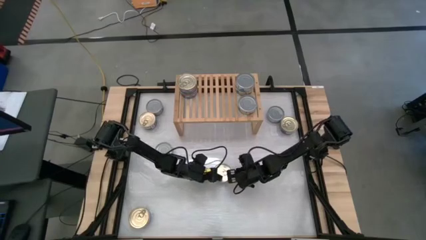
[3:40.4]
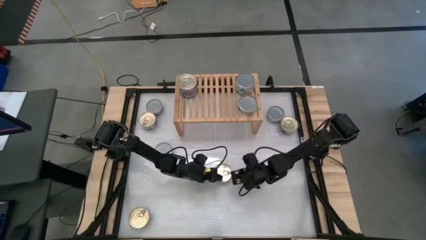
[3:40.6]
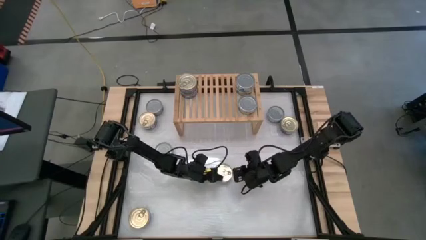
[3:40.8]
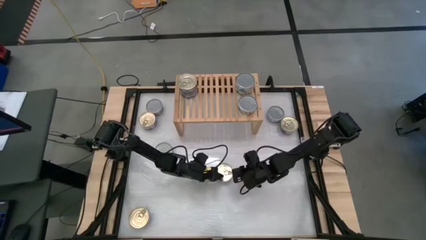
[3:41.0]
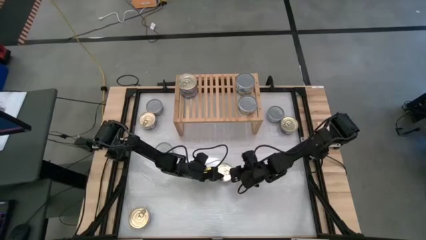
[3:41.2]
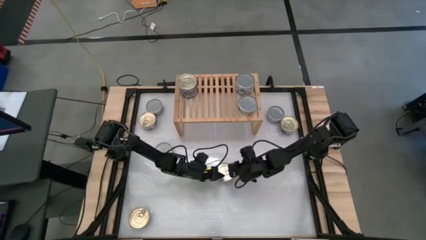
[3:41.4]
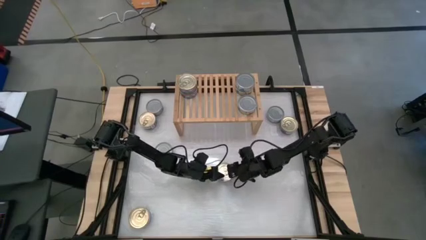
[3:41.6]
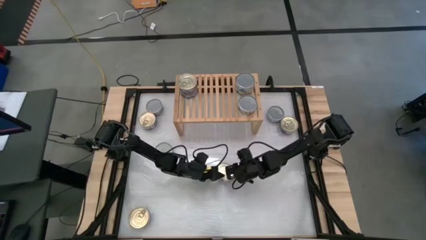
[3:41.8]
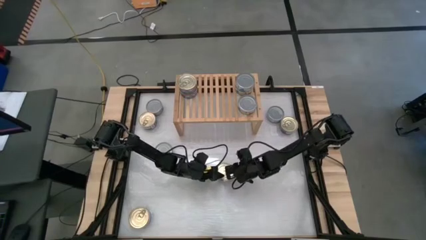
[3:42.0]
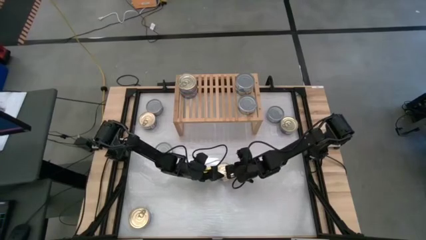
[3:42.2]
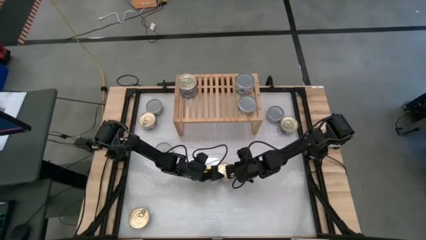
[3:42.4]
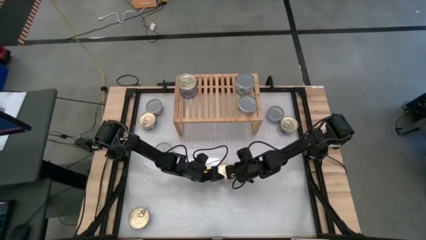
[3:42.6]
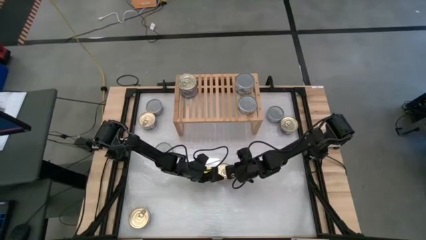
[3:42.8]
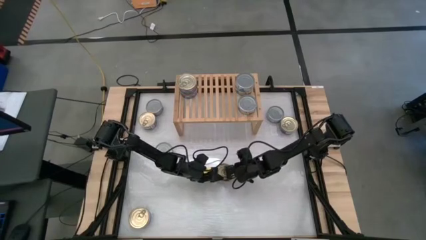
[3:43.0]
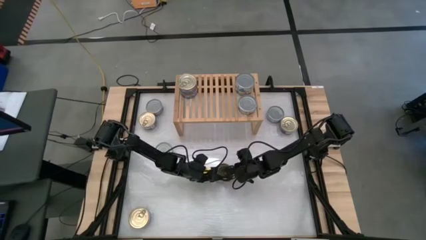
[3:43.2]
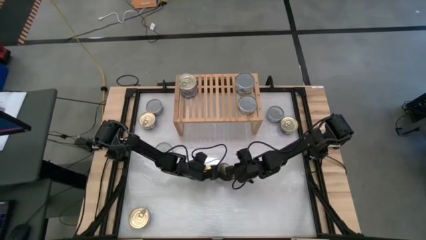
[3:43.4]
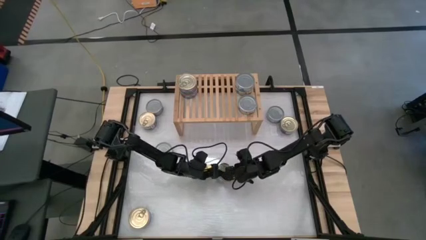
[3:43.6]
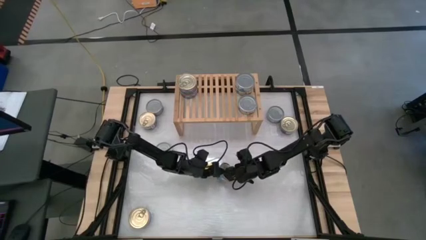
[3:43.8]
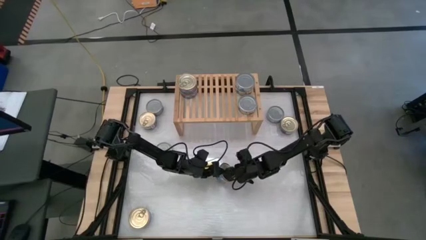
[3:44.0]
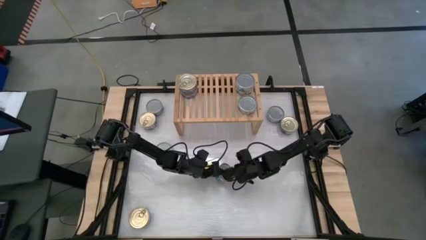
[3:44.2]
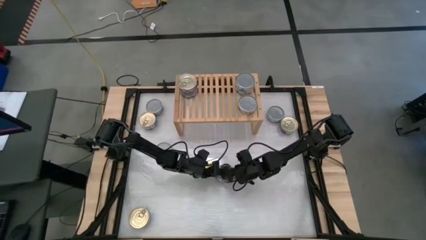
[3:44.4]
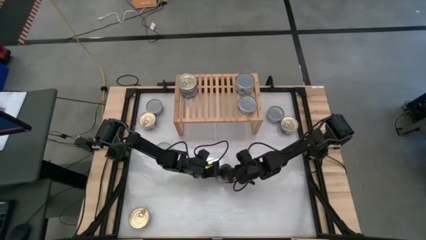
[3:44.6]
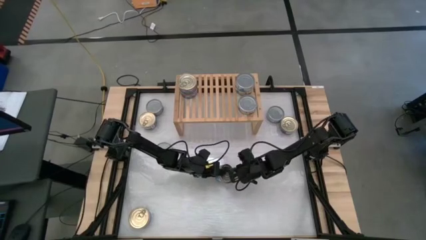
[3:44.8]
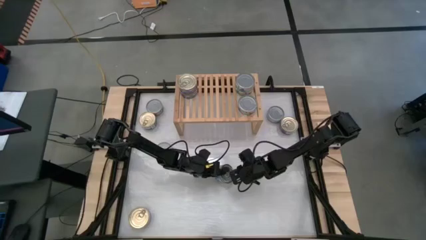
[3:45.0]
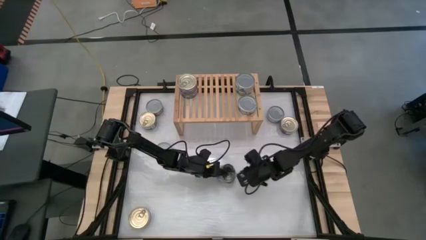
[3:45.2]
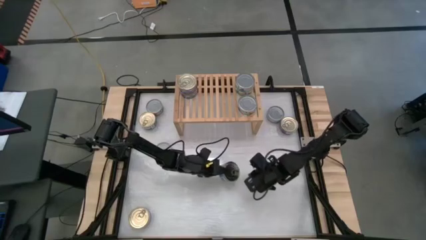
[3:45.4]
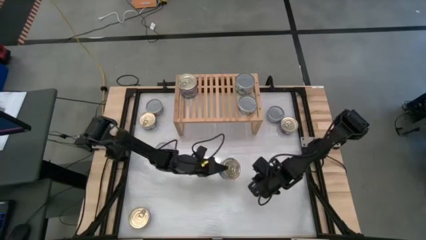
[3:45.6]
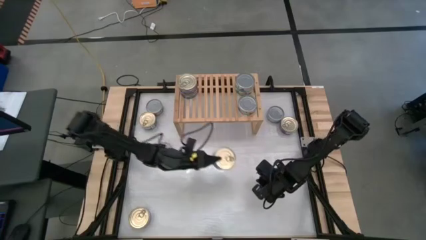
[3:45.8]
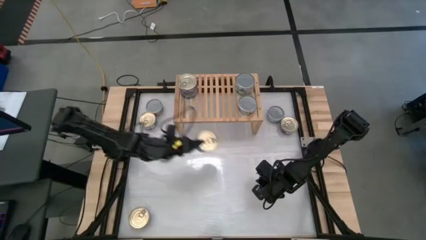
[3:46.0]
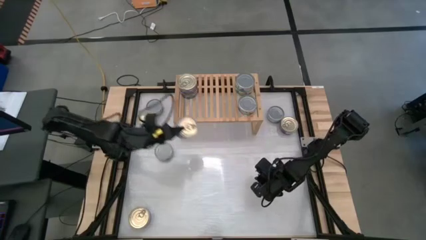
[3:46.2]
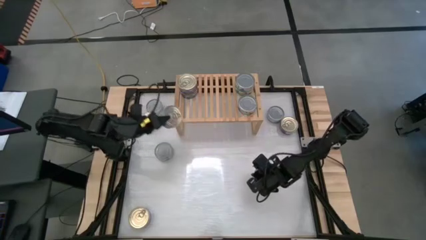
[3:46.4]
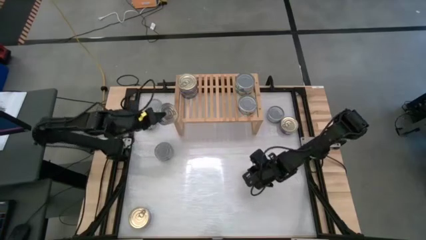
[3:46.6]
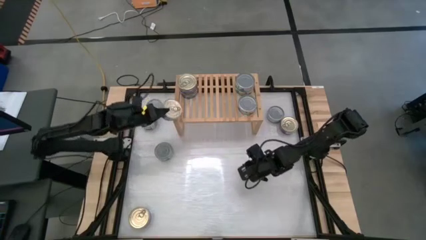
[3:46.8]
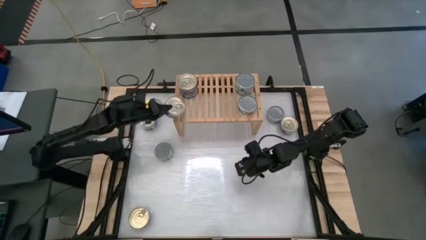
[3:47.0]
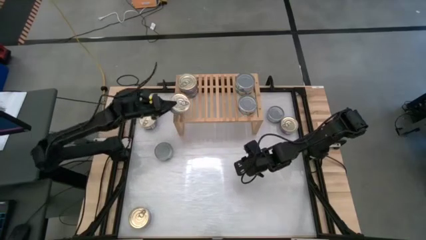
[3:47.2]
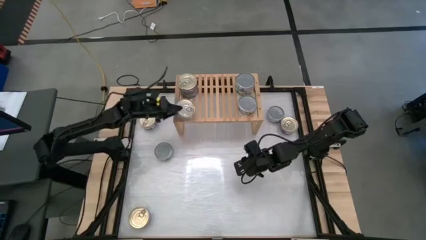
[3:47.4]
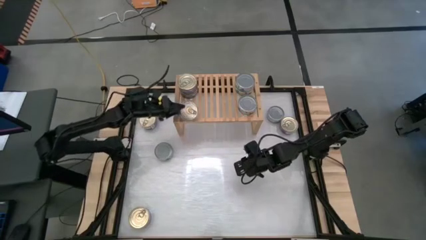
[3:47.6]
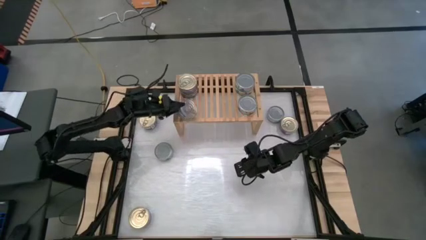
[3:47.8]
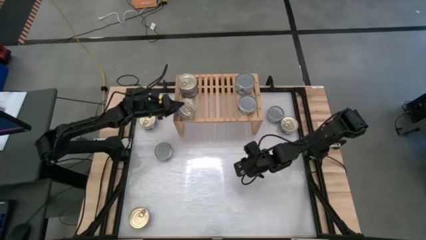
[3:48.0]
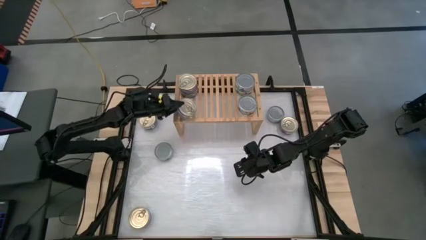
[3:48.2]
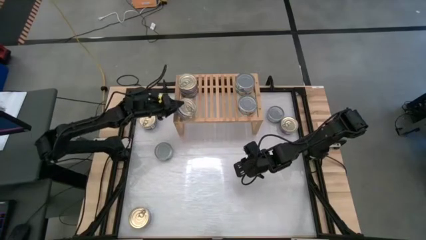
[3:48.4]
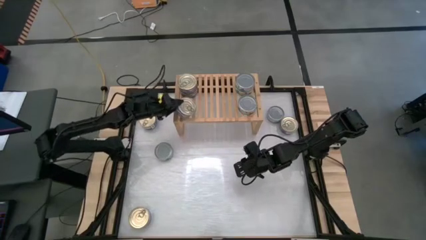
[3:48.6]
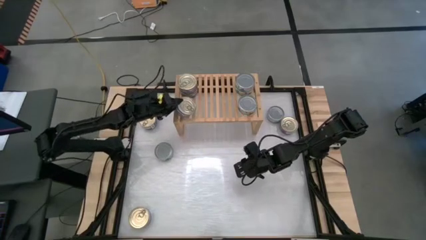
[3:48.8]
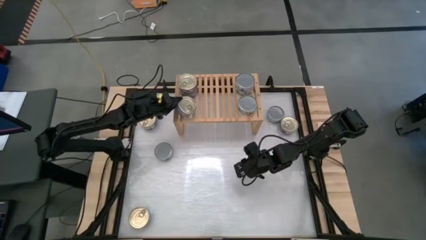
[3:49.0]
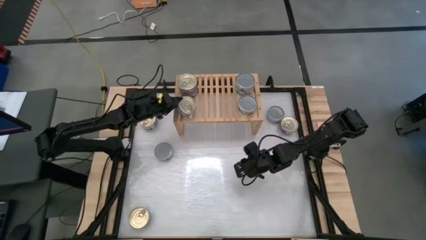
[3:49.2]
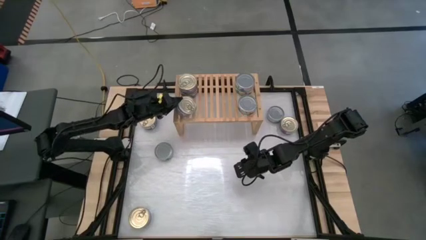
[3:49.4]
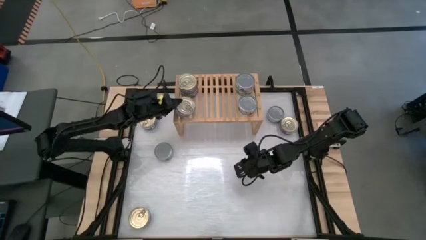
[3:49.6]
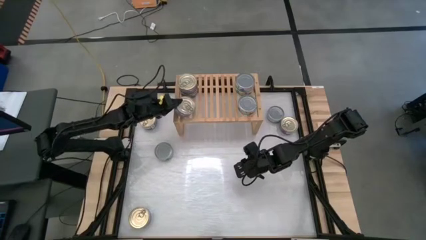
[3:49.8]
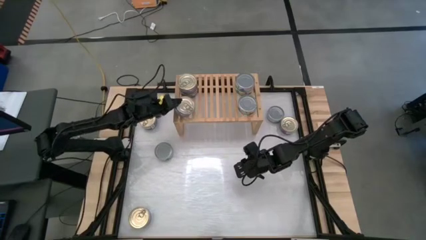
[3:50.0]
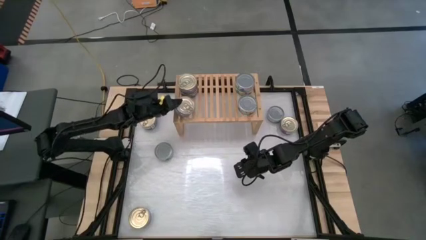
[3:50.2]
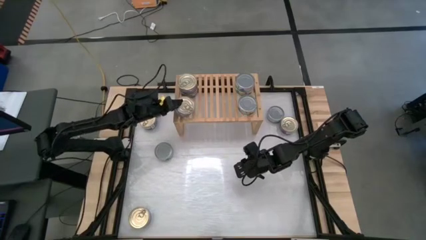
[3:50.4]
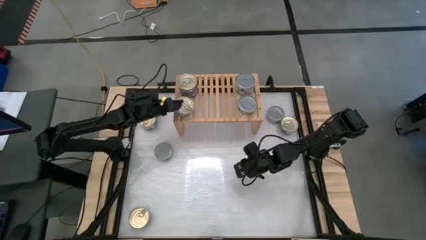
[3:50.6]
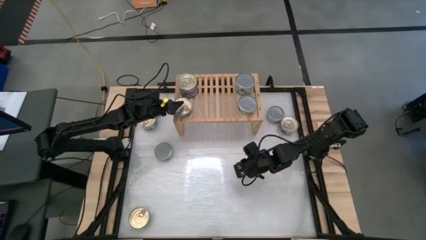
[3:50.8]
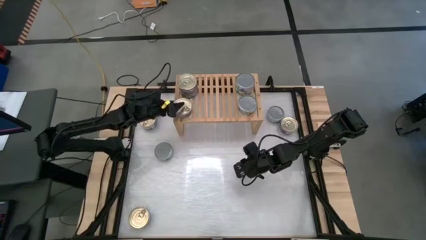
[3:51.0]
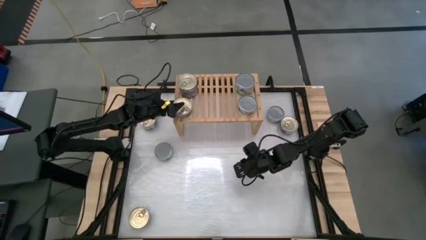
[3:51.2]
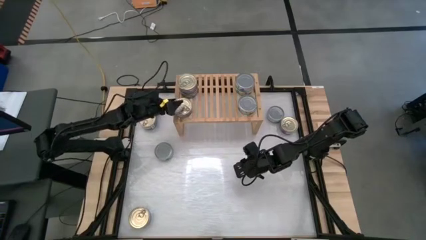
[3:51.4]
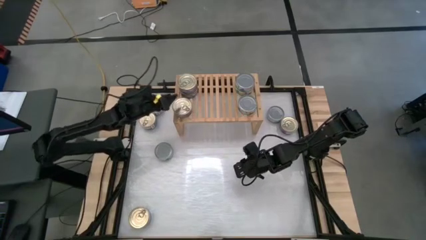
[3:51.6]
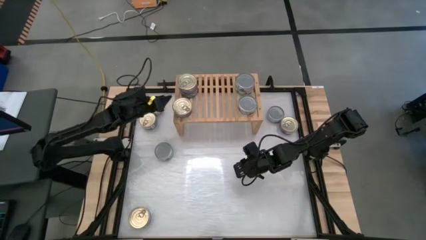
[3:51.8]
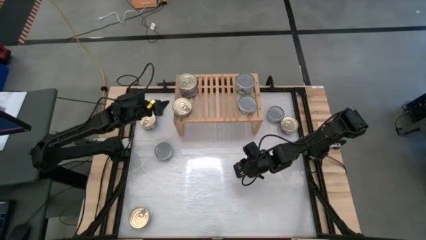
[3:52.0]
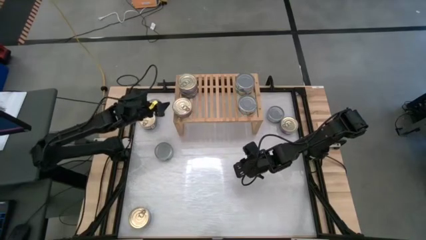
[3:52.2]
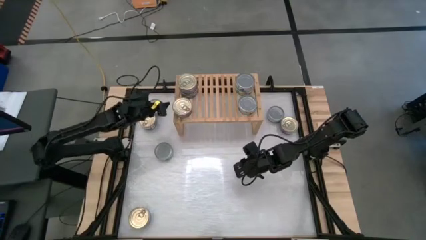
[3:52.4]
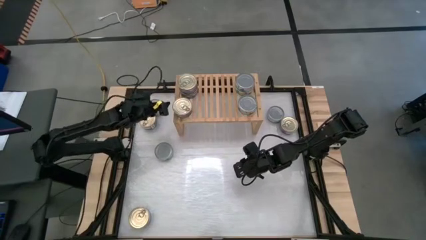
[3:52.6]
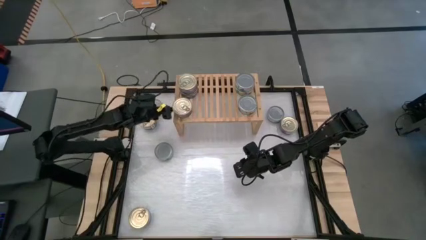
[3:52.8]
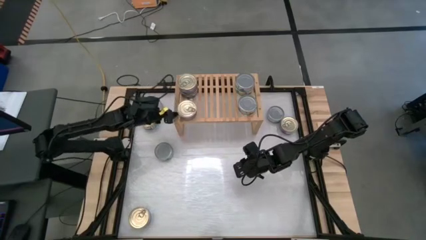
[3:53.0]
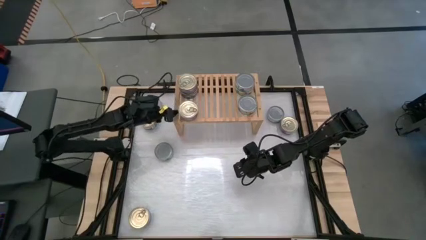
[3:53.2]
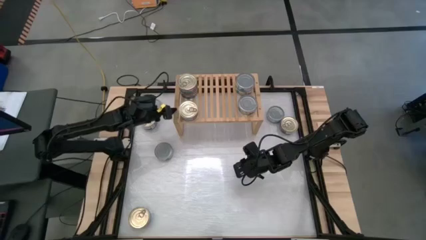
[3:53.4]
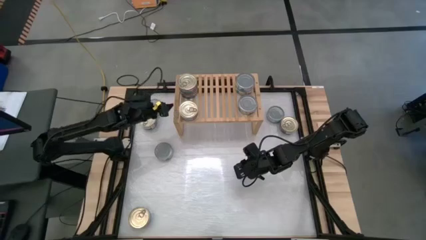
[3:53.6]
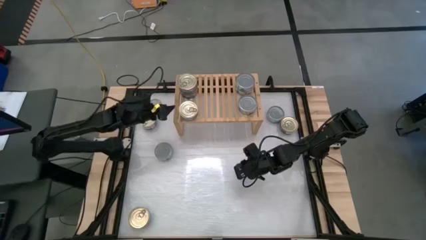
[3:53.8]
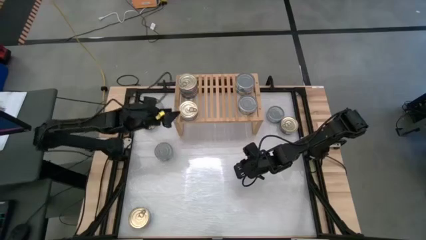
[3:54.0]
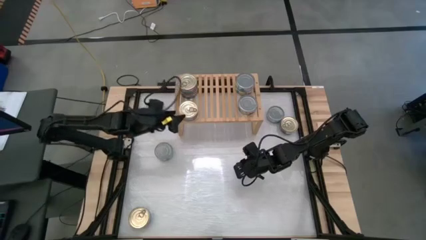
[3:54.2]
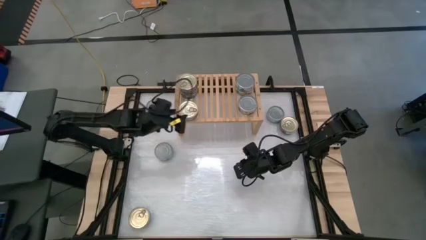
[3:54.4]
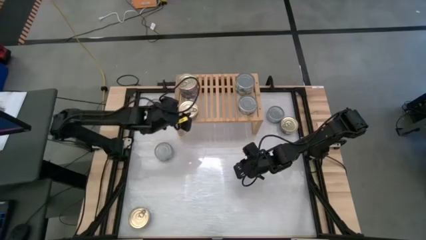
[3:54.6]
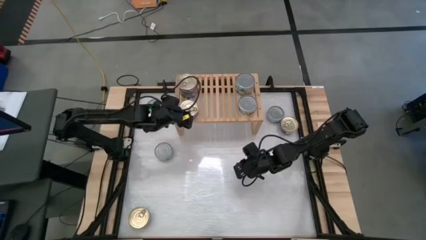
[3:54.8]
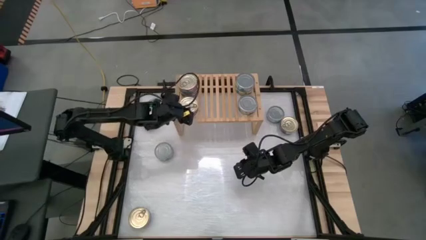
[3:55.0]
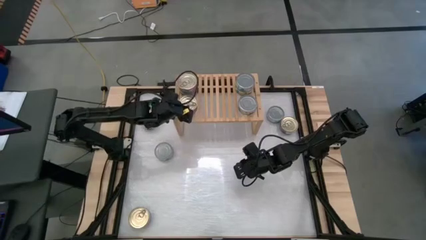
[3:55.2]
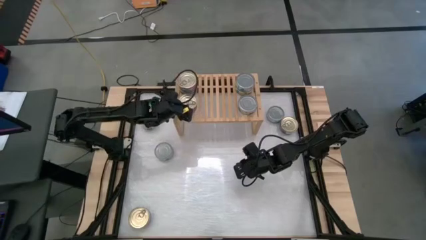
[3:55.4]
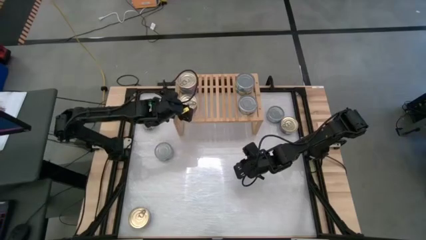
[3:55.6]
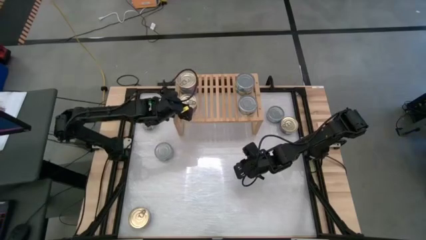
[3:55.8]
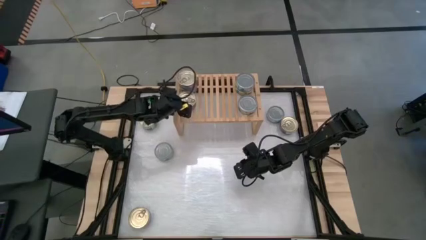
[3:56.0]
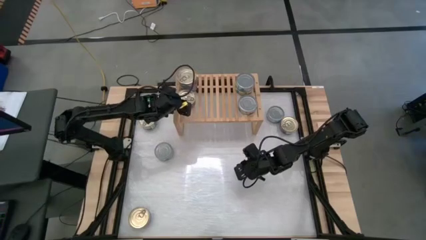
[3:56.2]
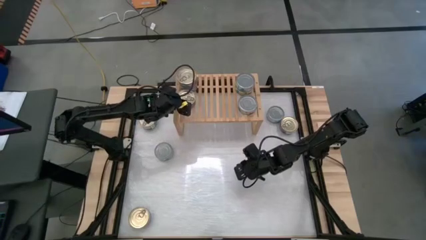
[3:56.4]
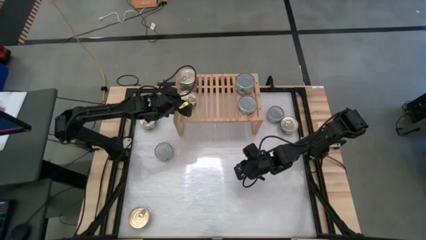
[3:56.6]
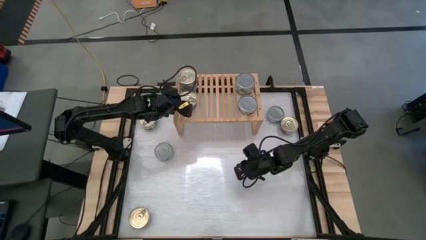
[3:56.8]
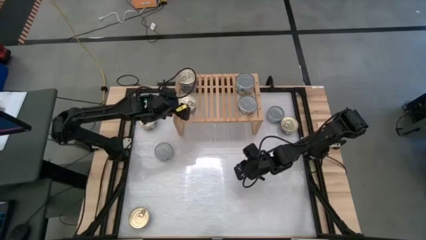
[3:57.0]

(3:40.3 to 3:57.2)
Task: Stack canned seafood by type on shelf
Put the blue-pink tuna can on the shelf aligned with the other blue-pink tuna cans
